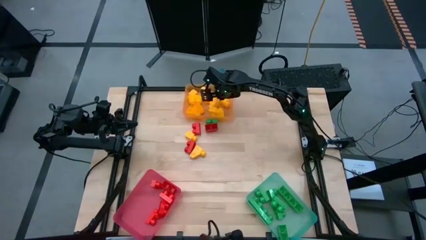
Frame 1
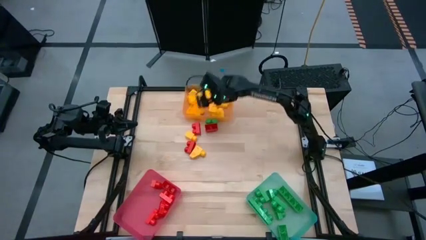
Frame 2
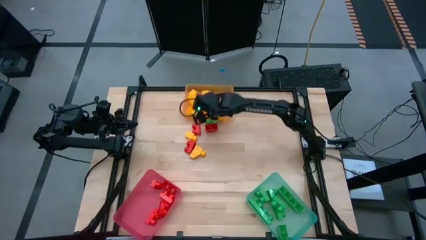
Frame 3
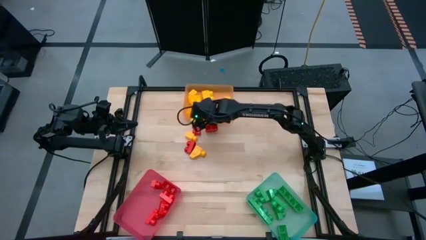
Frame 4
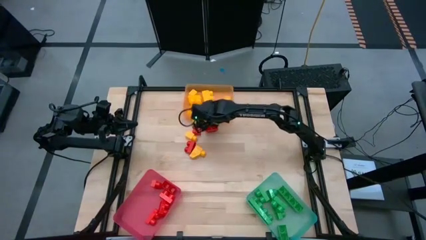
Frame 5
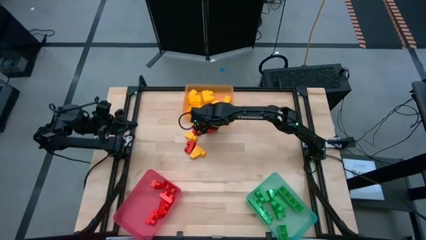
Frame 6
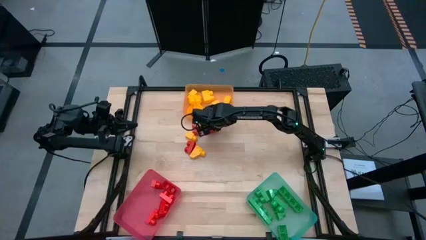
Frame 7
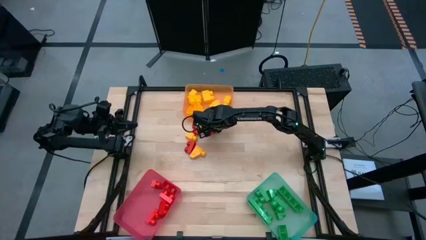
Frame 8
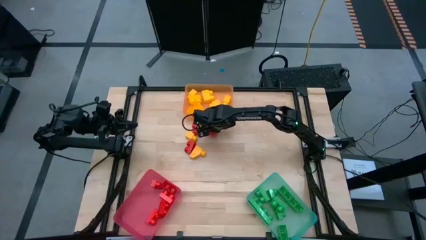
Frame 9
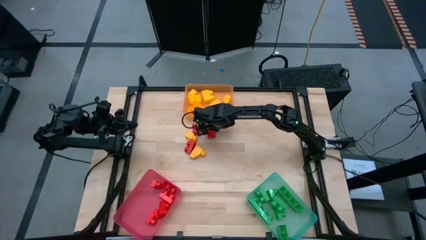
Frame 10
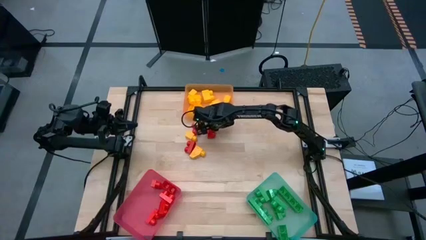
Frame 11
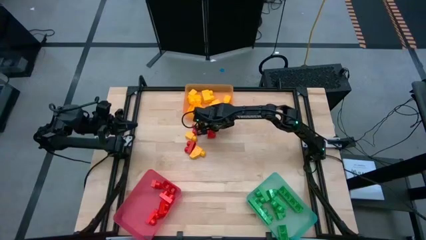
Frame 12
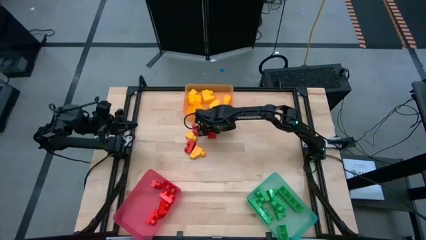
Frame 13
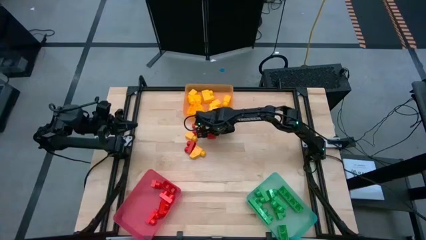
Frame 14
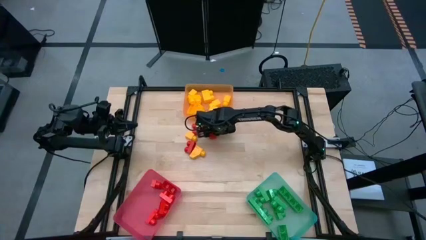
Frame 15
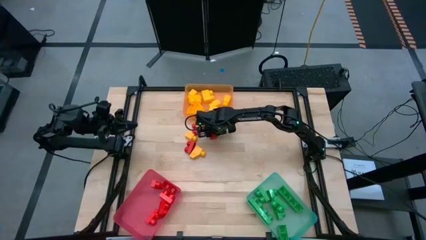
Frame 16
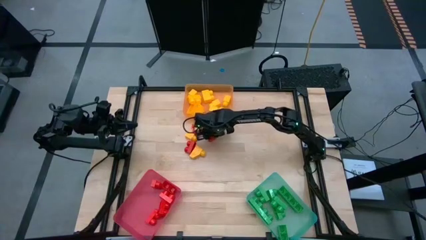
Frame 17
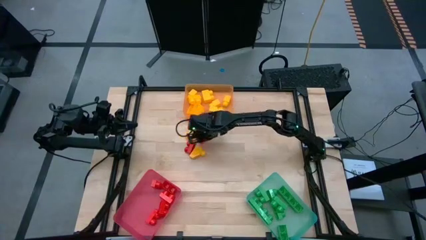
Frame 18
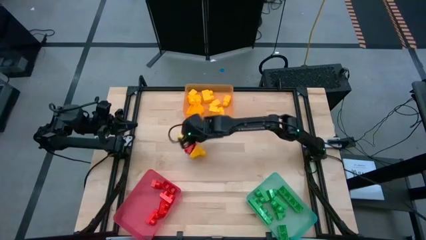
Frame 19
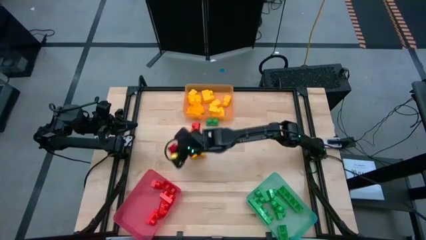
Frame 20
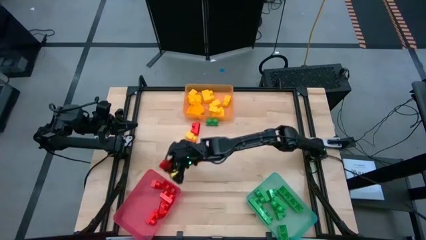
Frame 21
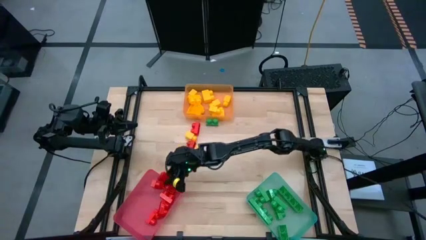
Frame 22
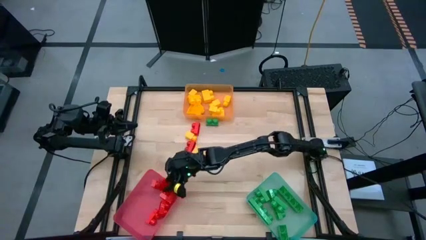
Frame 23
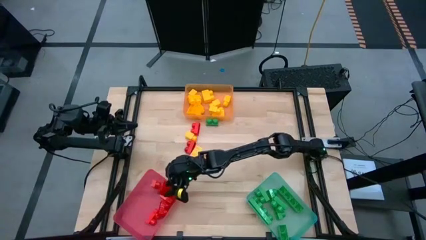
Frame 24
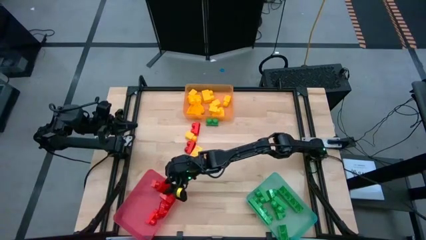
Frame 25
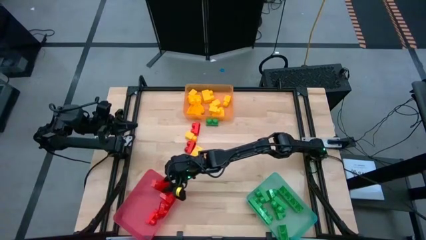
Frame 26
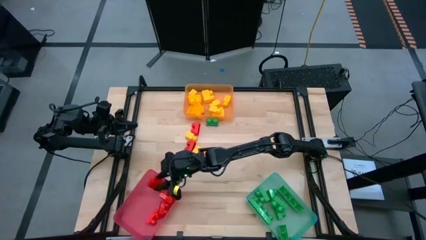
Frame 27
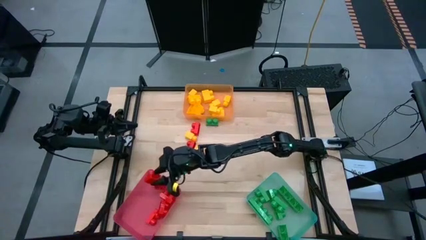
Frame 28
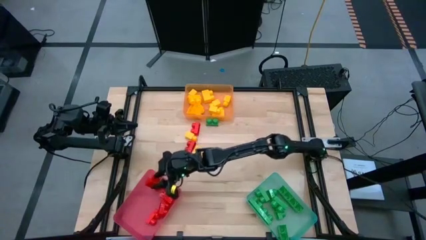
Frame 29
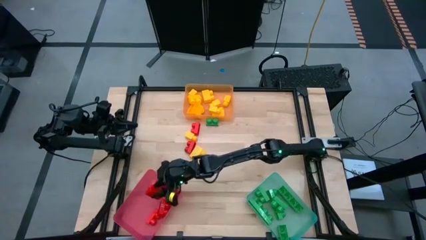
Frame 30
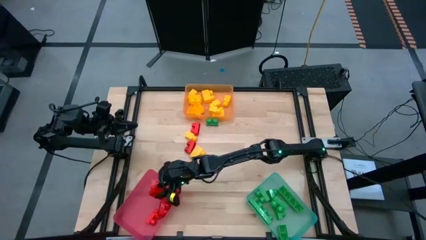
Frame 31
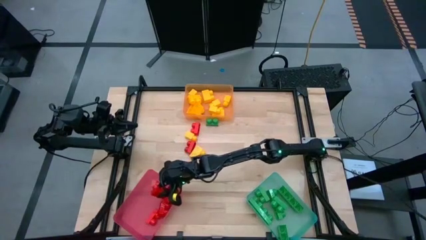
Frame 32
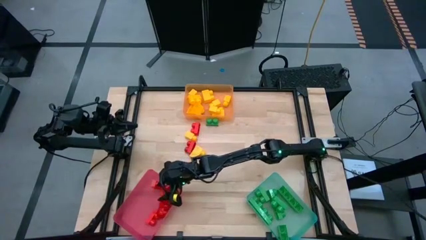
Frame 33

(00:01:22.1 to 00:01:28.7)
Task: Sort blocks
Put the red 2 stud game piece into the pink bin

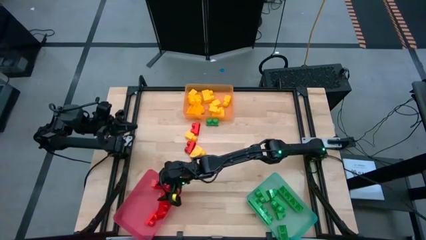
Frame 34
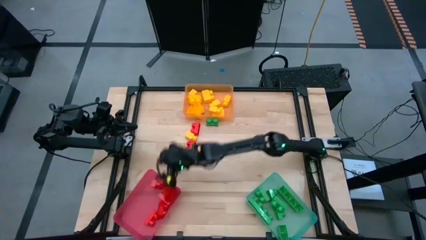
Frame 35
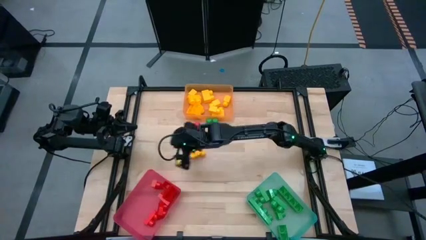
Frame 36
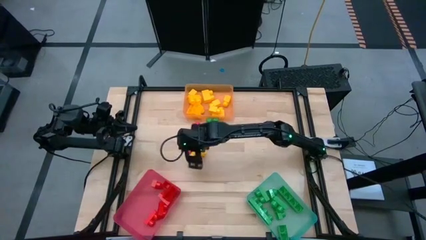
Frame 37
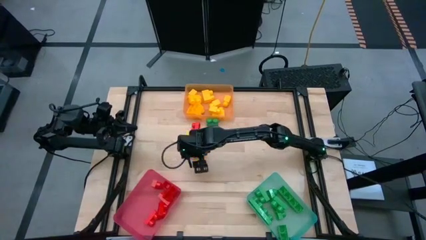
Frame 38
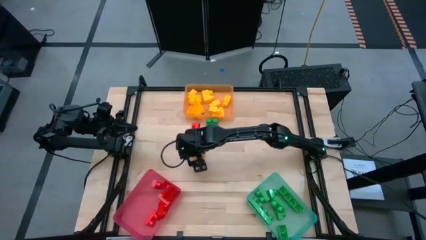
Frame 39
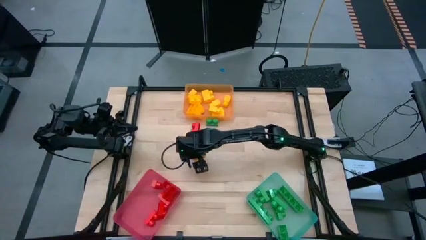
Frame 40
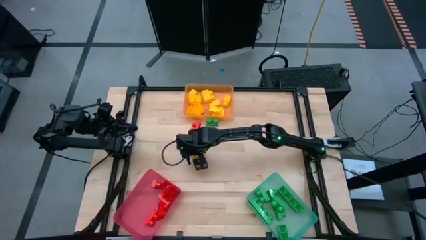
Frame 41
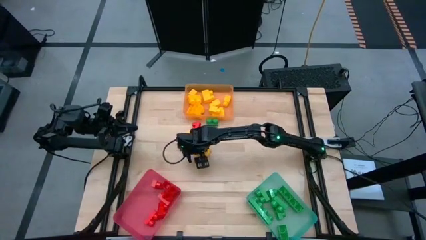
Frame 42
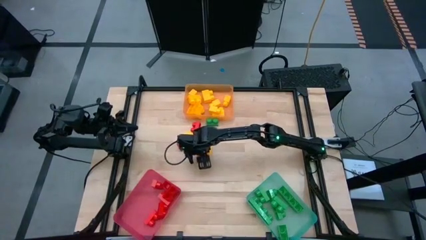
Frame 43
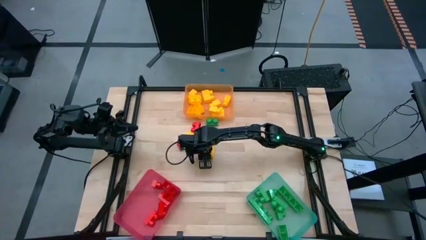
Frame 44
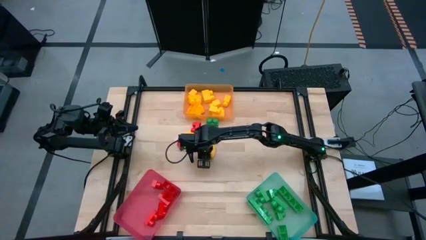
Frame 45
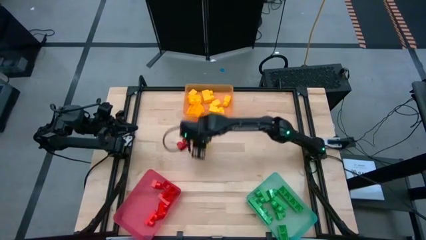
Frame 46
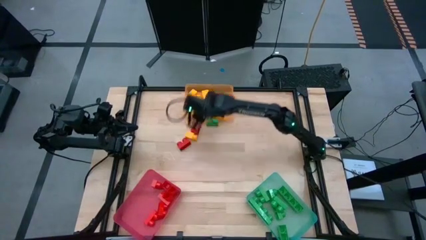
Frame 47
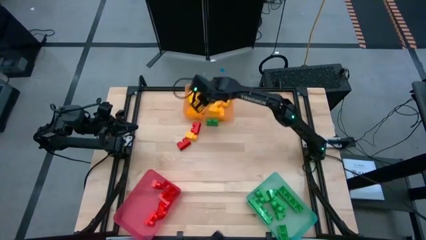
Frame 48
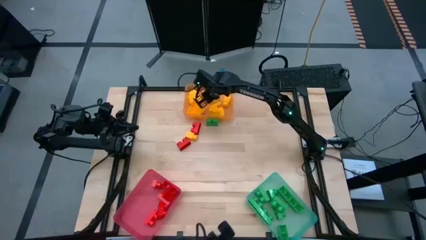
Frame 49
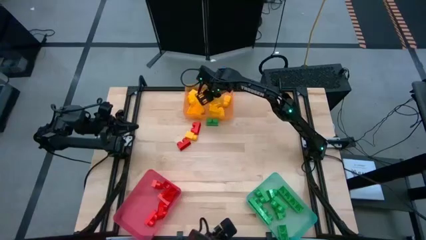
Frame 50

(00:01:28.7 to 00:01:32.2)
Put the yellow 1 stud game piece into the orange bin

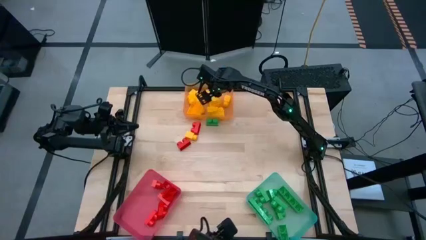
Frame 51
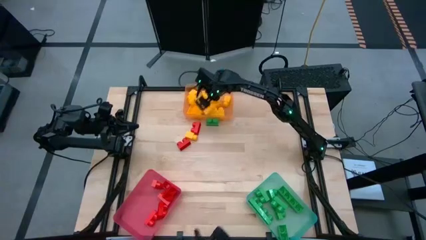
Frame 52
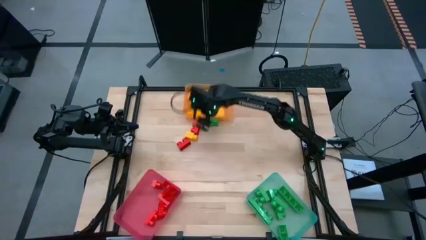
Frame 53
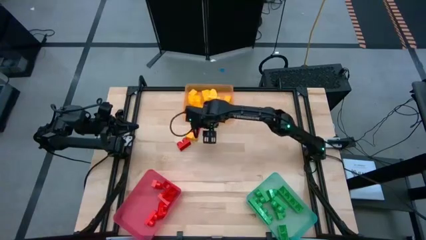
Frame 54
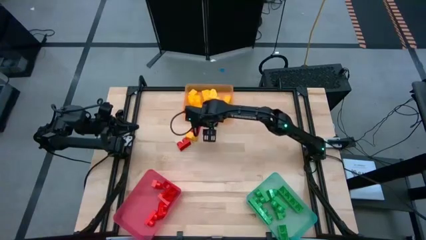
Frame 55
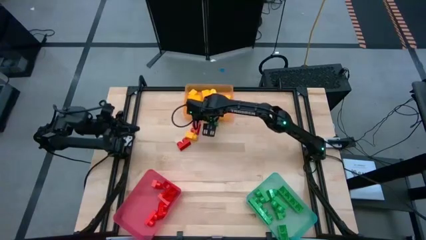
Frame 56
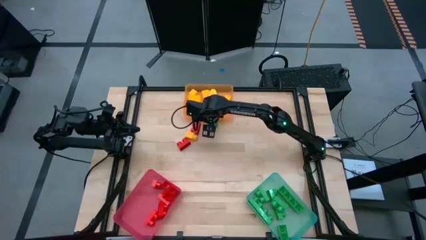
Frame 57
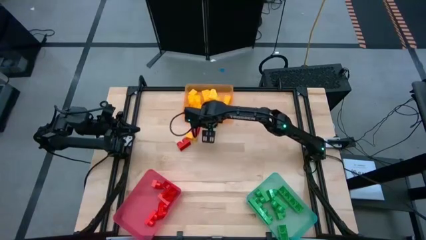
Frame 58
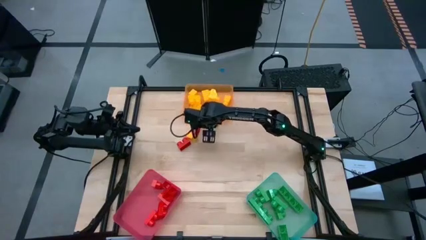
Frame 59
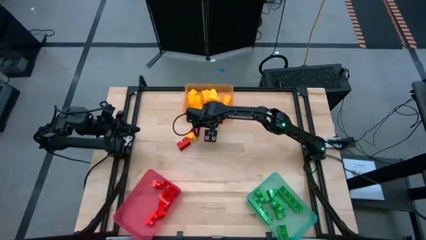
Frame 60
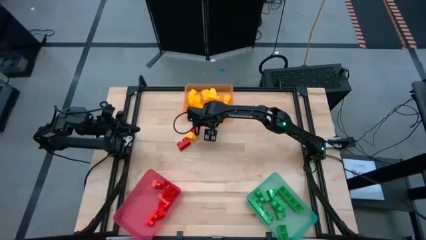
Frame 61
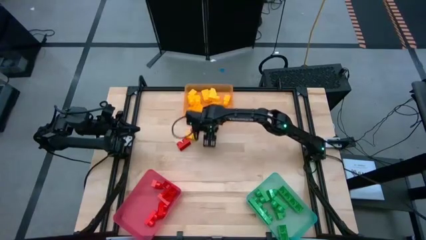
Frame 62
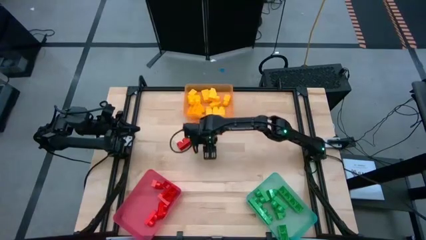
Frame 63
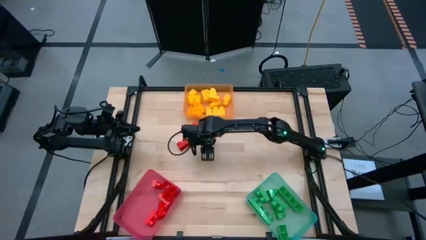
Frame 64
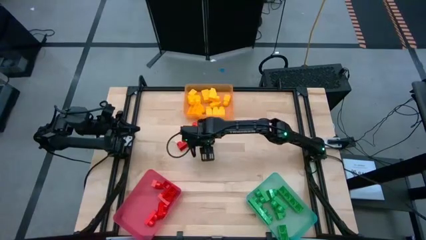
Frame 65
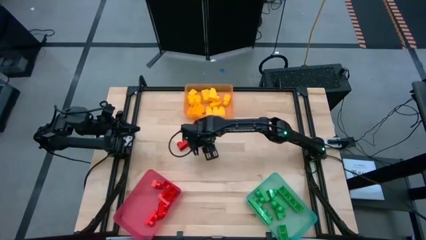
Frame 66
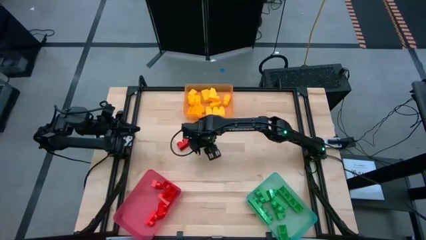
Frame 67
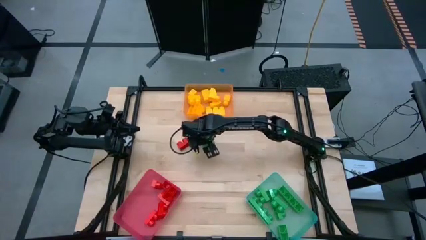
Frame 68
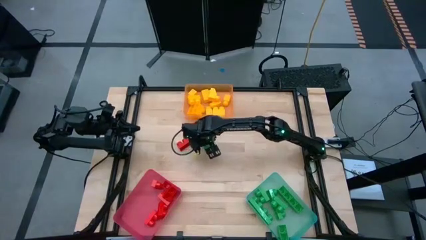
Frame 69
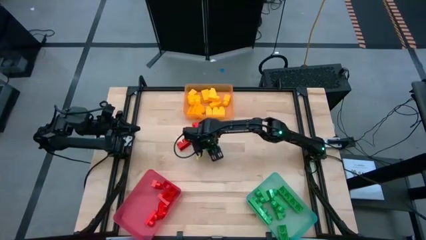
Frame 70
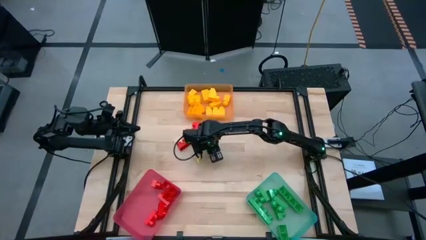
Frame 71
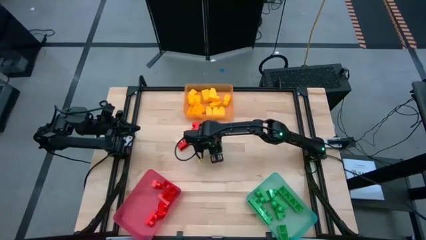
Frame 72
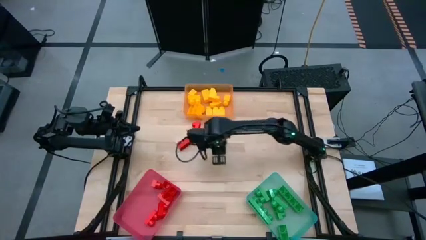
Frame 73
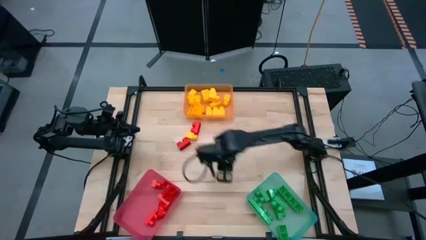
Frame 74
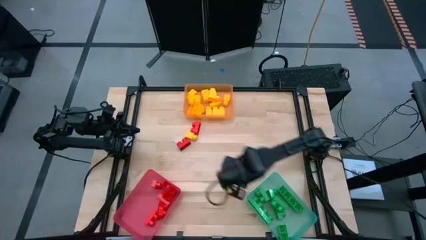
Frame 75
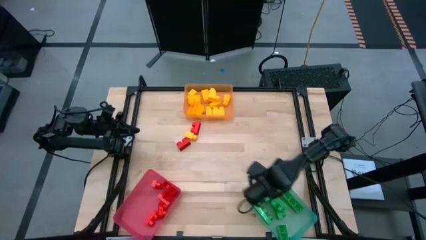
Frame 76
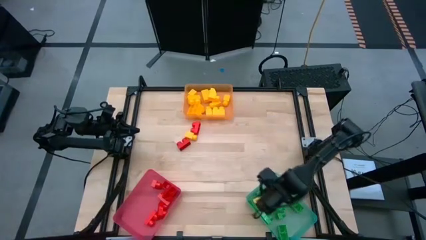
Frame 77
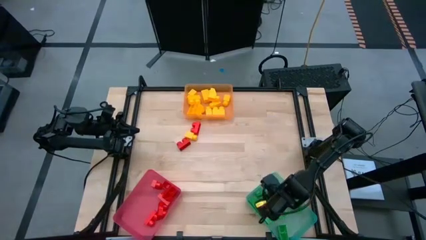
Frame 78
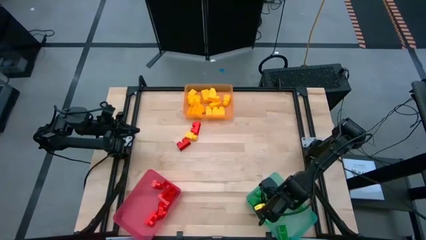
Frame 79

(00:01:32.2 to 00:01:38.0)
Put the green 2 stud game piece into the light green bin

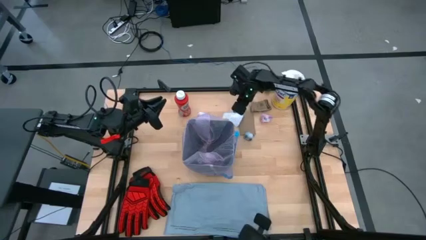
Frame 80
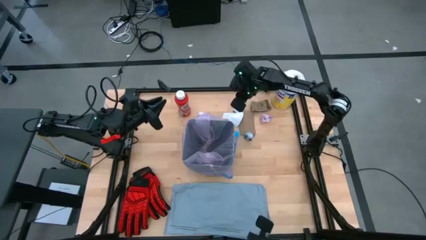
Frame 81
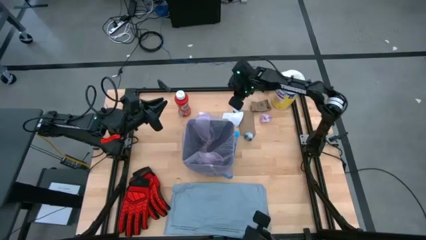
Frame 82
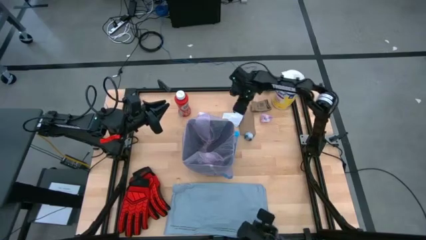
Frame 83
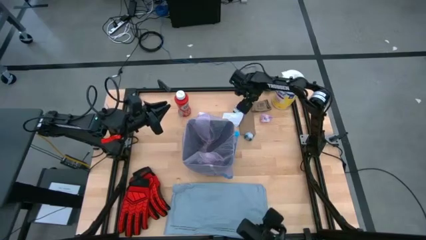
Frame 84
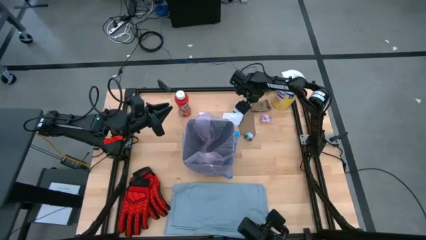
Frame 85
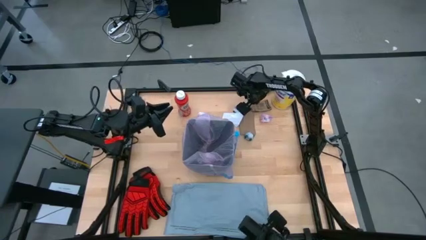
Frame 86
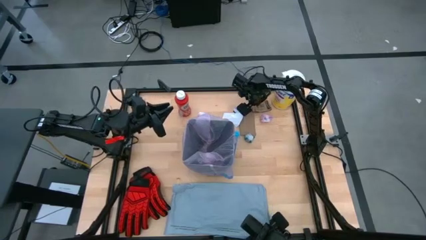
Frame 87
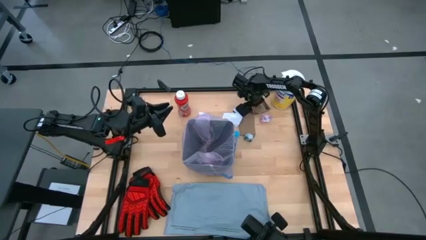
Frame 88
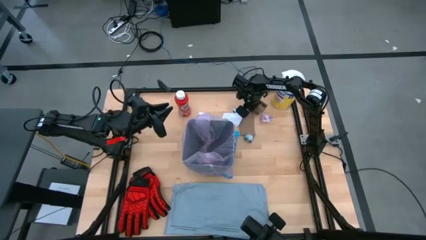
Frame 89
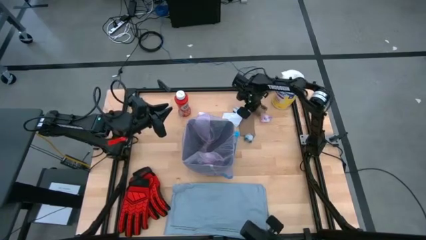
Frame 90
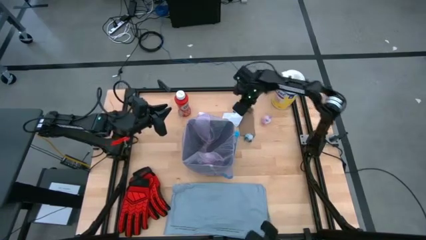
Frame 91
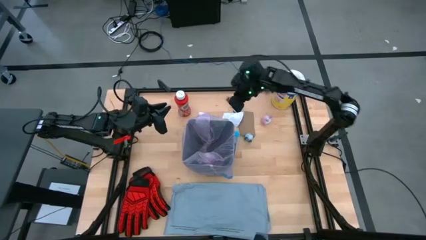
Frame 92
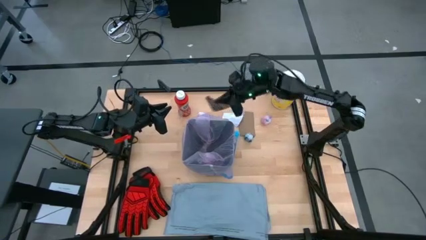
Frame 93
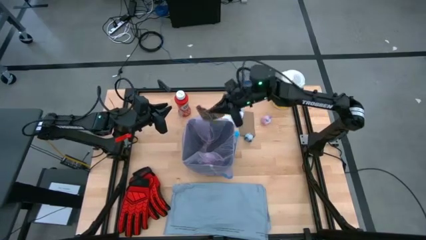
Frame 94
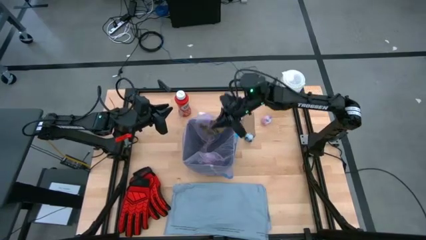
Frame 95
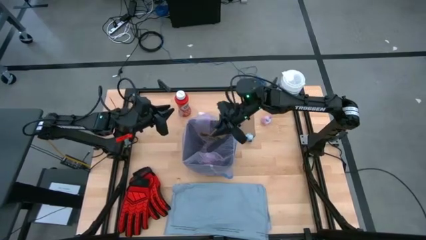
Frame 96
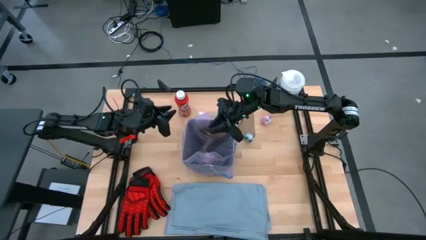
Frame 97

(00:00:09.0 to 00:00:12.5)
Task: place trash/remove bag and relplace
Put the brown cardboard coffee sleeve in the trash bin
